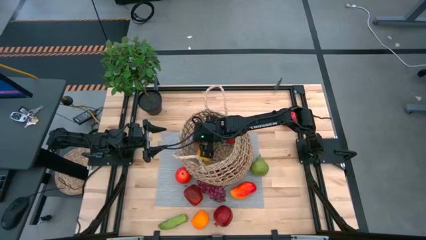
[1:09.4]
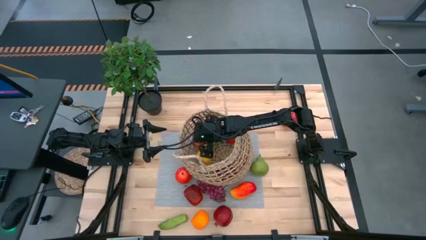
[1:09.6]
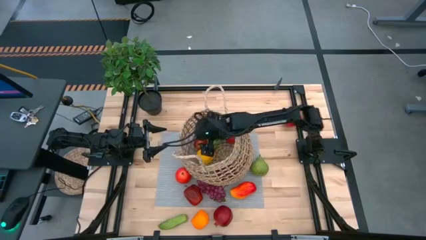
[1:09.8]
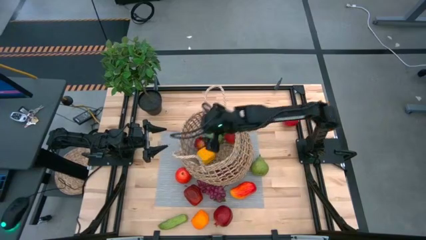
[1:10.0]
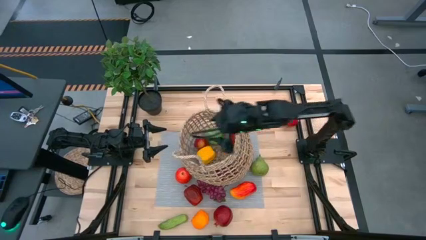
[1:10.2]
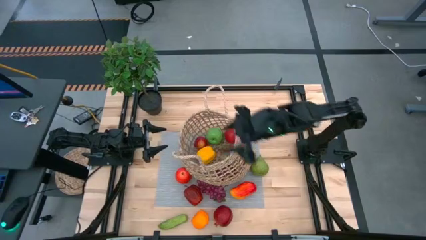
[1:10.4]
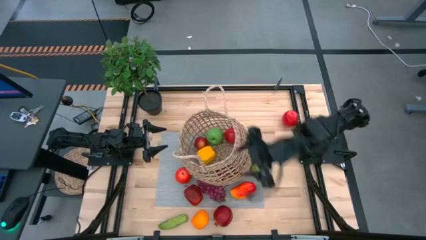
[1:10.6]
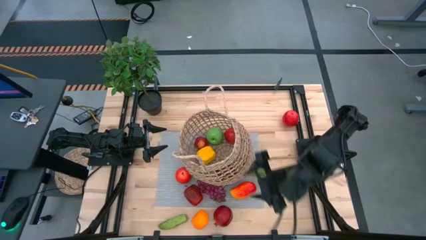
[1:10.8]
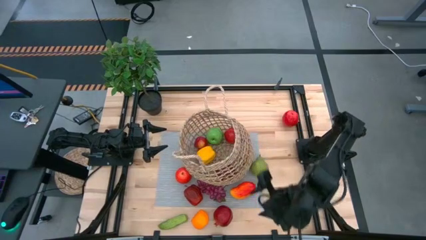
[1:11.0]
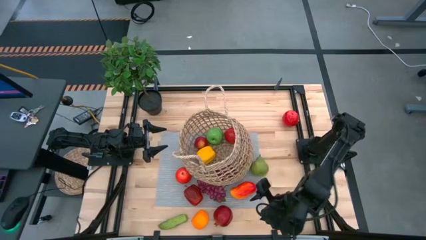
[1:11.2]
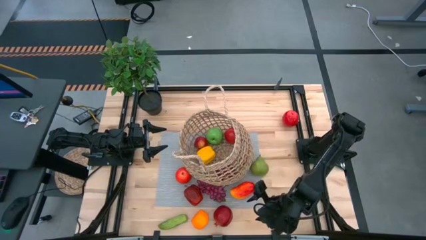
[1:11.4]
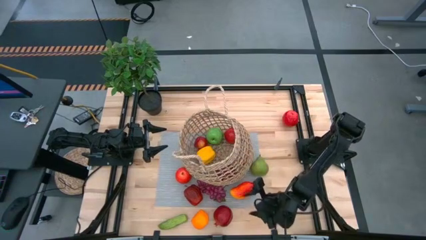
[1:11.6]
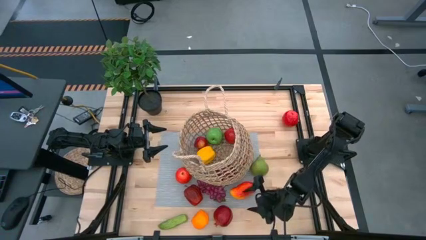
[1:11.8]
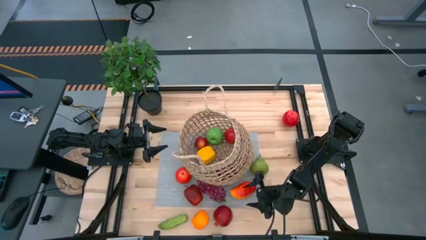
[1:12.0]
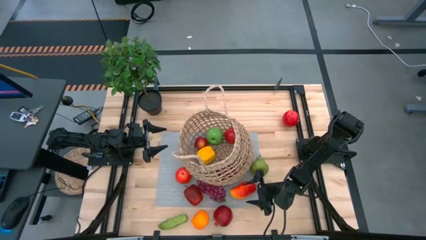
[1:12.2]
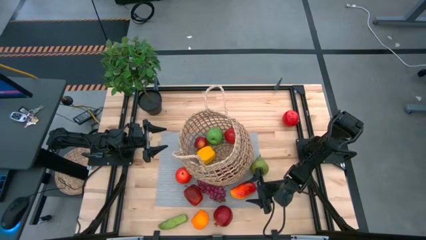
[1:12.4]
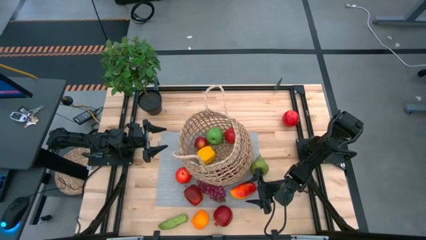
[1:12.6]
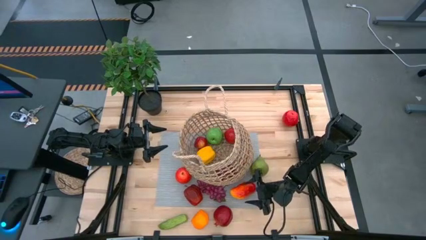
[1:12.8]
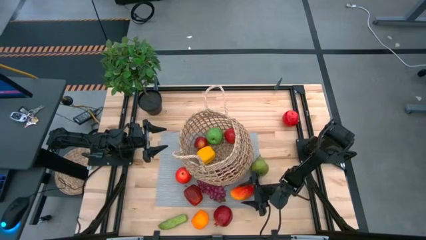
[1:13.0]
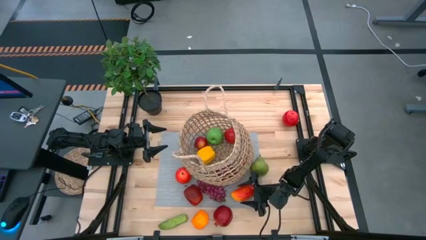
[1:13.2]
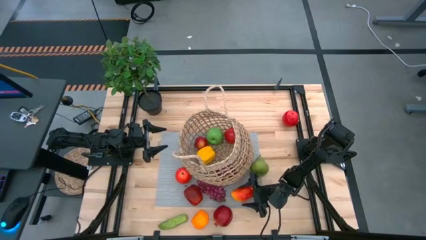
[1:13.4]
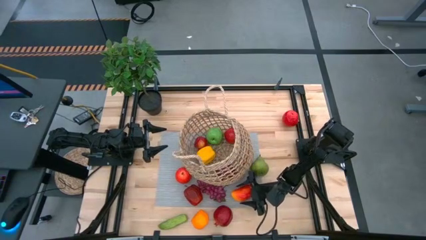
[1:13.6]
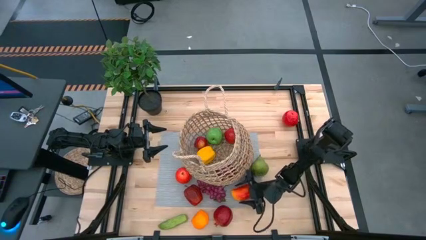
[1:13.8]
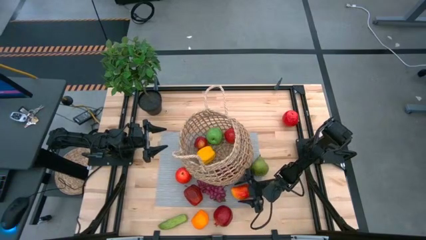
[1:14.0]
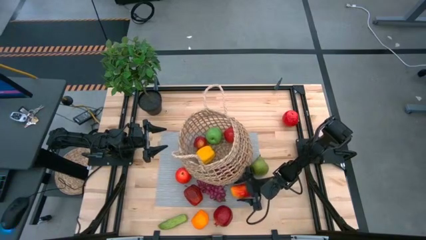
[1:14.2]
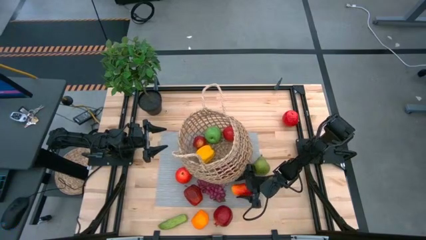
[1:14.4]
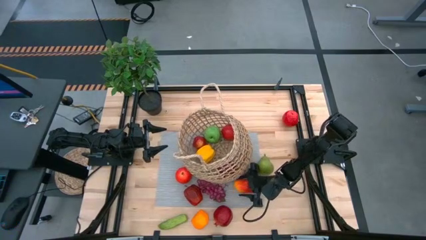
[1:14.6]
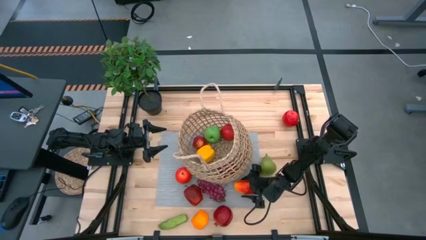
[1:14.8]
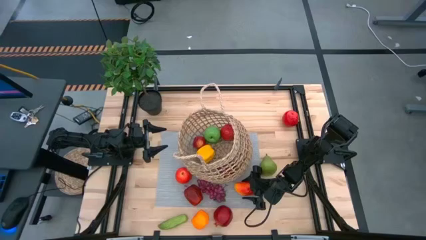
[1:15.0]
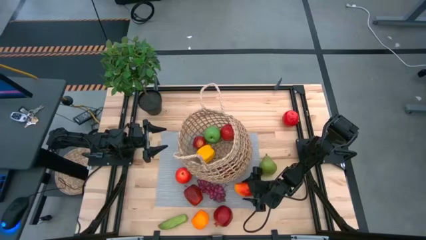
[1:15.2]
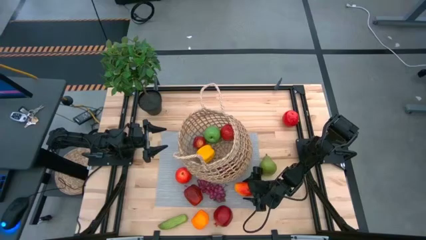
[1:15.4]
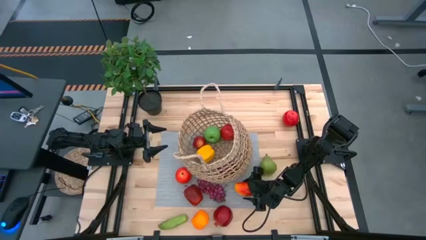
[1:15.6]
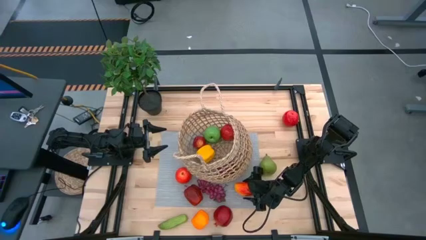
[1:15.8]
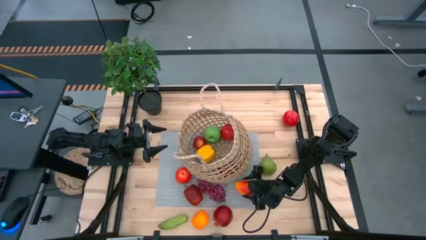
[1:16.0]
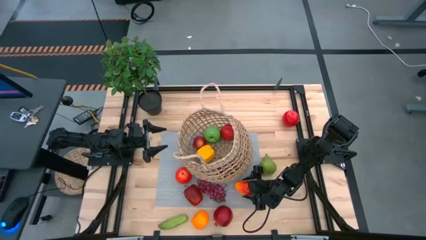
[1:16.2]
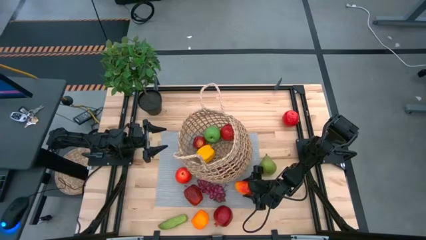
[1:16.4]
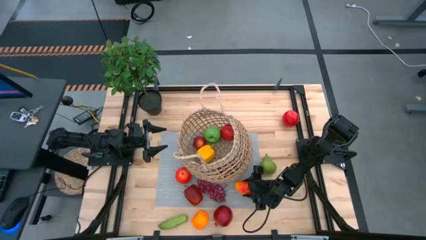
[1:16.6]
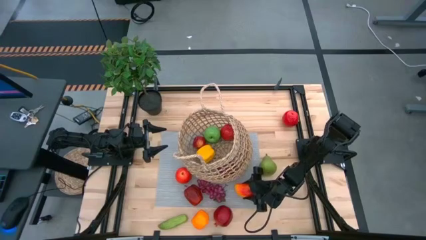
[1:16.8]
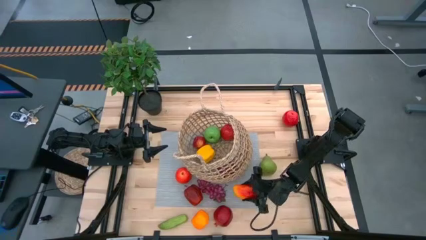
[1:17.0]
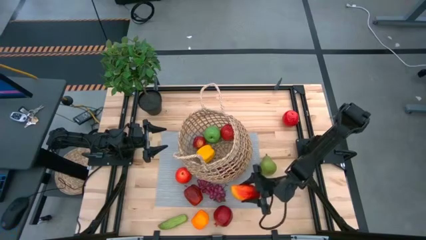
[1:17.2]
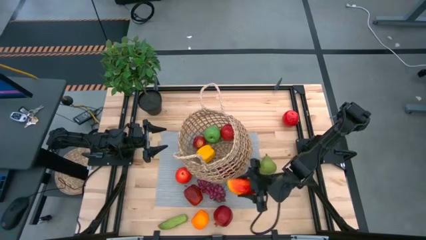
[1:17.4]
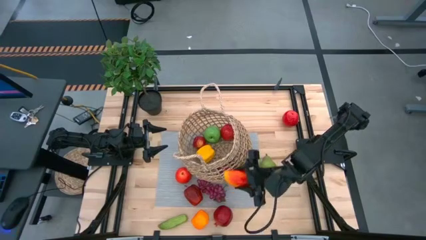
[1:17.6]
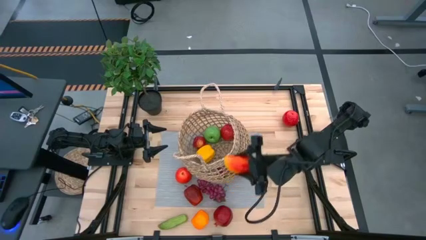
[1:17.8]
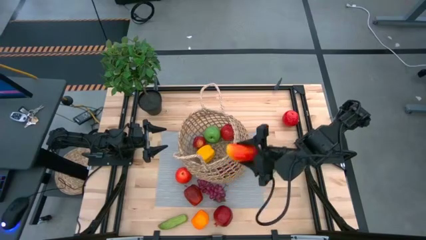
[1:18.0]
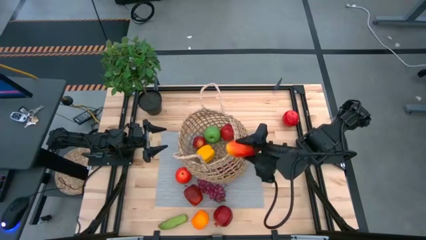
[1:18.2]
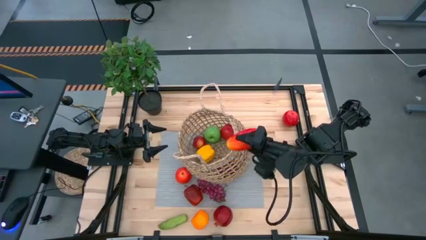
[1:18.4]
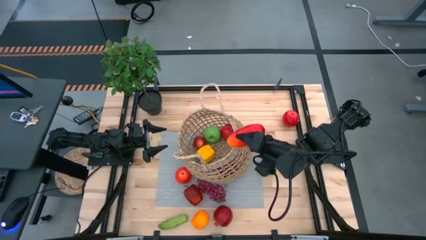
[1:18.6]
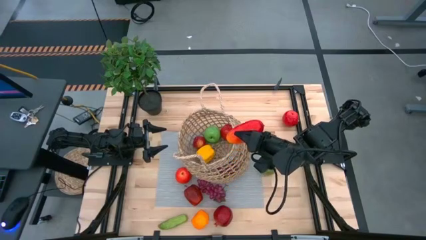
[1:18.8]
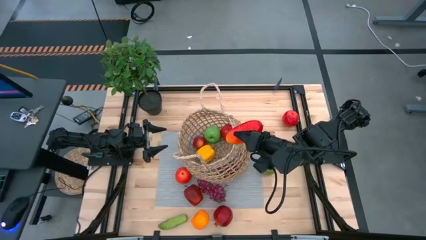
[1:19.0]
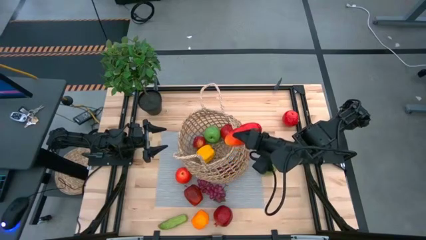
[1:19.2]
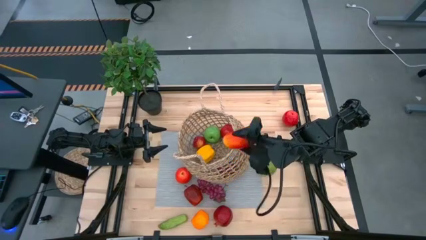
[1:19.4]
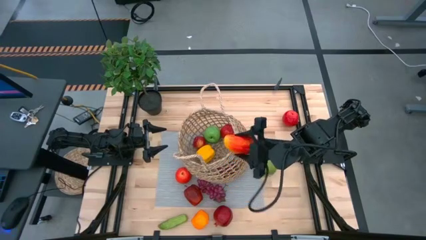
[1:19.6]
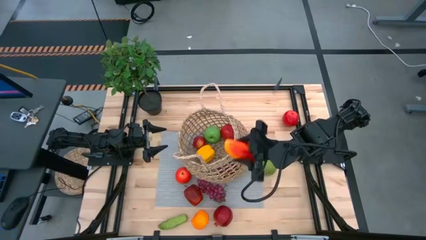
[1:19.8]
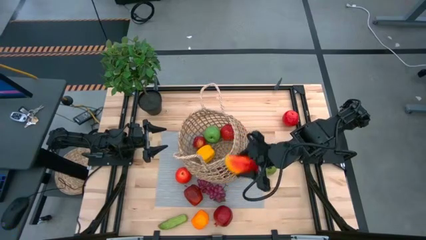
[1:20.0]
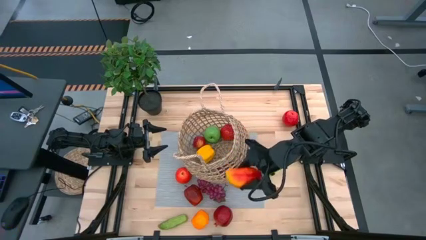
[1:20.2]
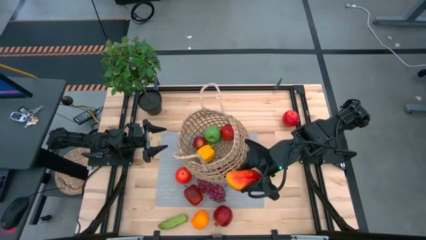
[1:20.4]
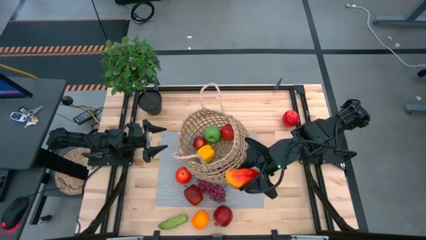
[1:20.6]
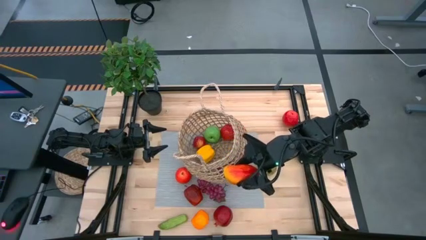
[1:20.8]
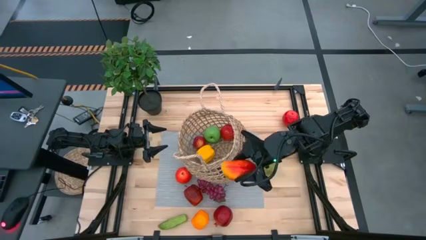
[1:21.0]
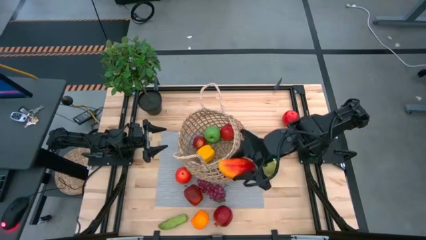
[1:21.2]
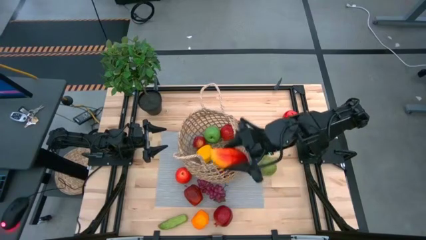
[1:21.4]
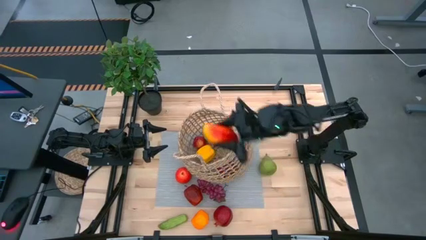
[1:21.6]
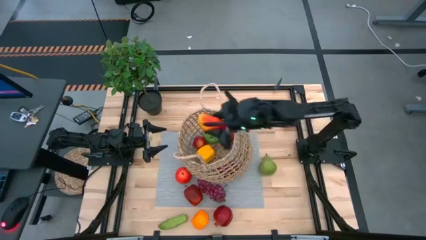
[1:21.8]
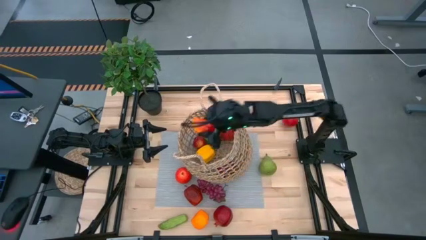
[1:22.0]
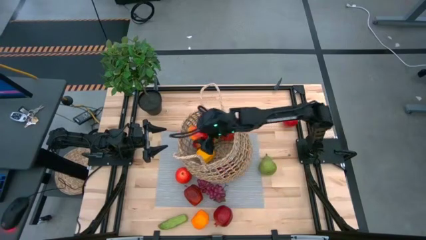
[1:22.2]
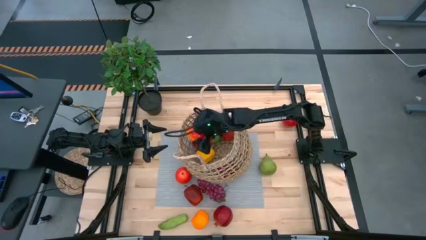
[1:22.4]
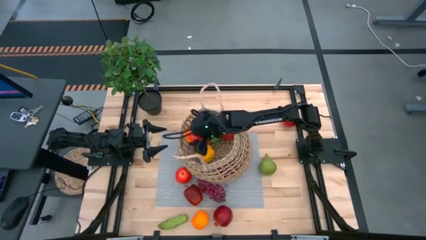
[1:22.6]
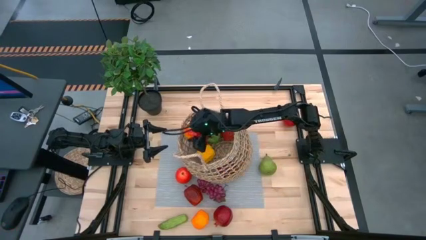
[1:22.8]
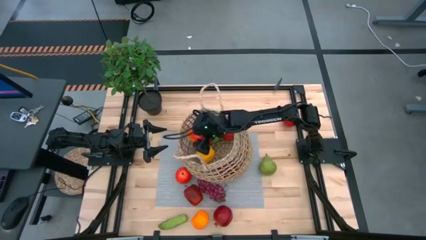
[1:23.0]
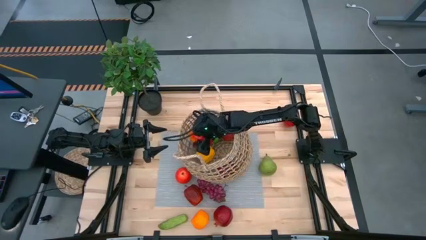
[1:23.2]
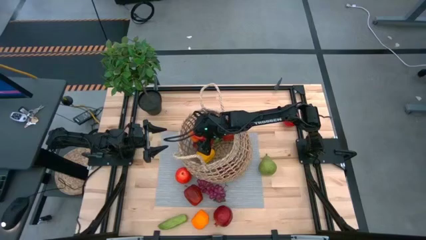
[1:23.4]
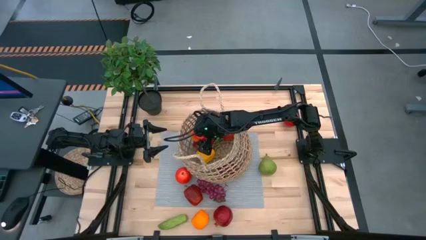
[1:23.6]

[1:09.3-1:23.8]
Task: Build produce basket
Put the mango into the basket

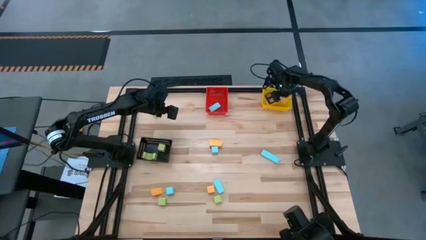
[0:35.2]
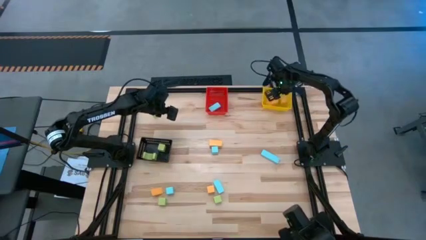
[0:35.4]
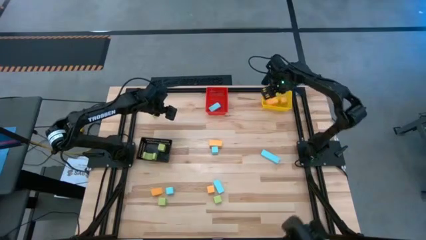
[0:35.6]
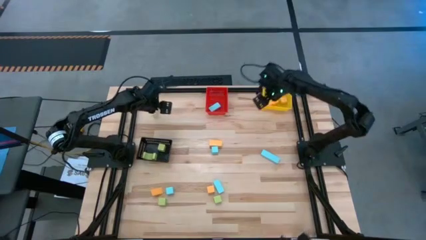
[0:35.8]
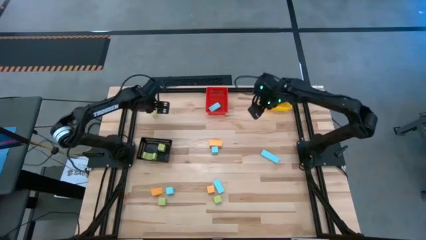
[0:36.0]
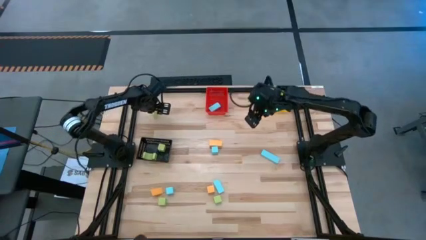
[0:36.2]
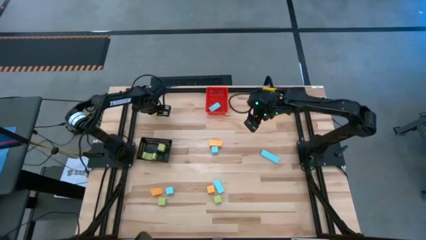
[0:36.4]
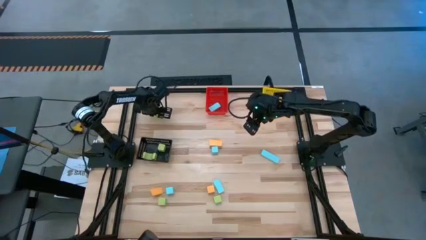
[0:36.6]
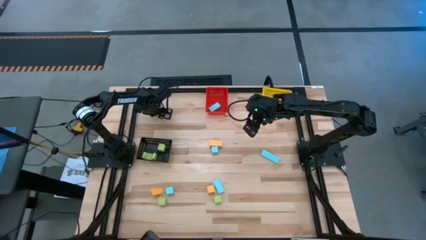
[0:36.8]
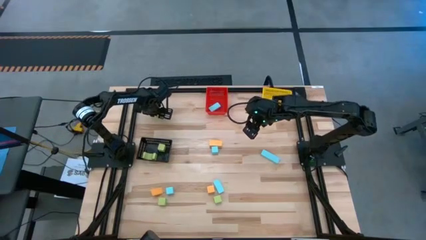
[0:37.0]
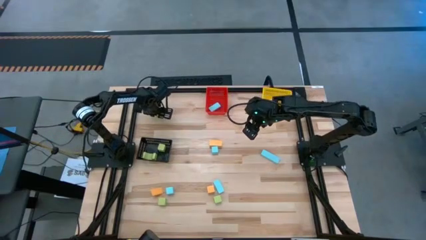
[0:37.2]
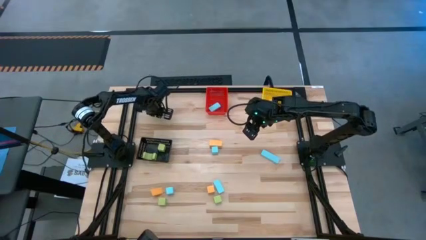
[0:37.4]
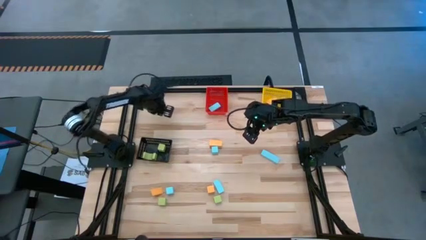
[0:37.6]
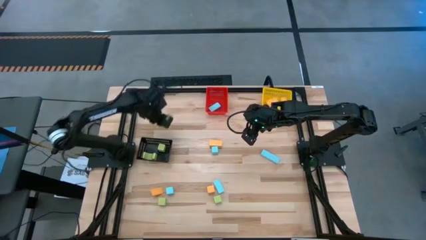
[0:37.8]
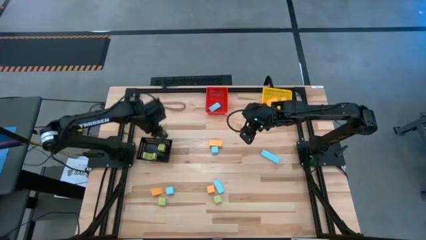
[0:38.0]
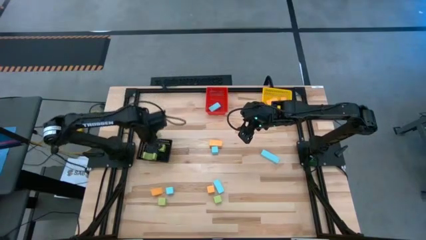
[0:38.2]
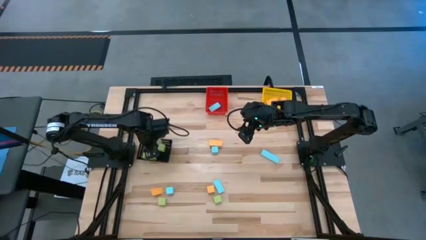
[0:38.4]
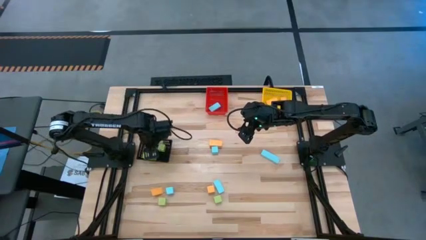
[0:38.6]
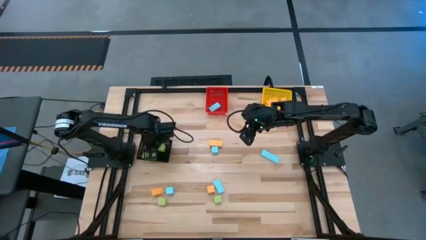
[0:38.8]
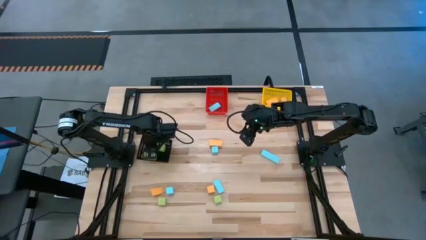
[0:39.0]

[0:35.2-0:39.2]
Task: Sort & place blocks by color
Put the green block into the black bin
